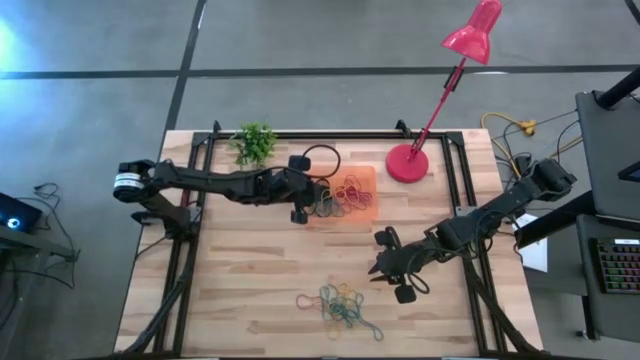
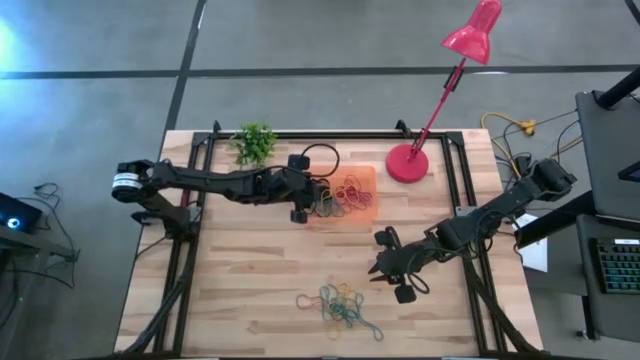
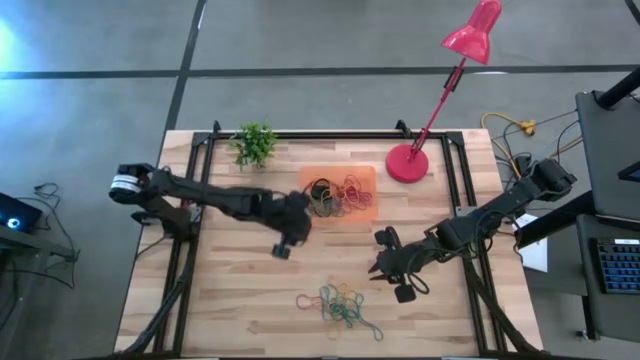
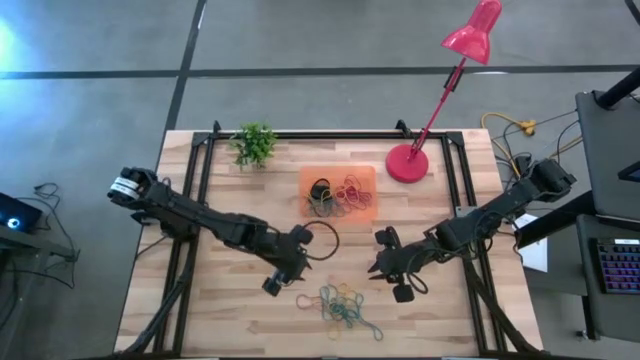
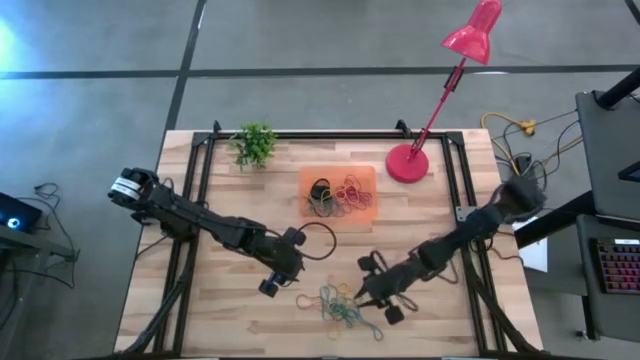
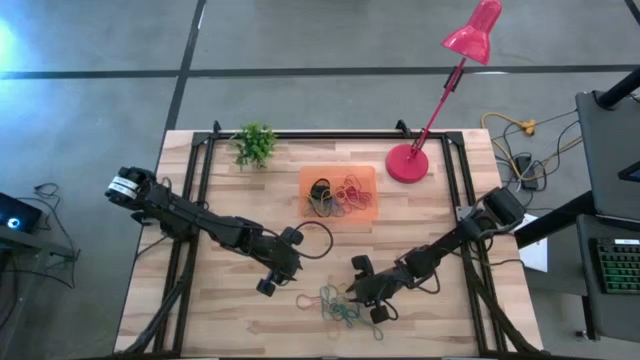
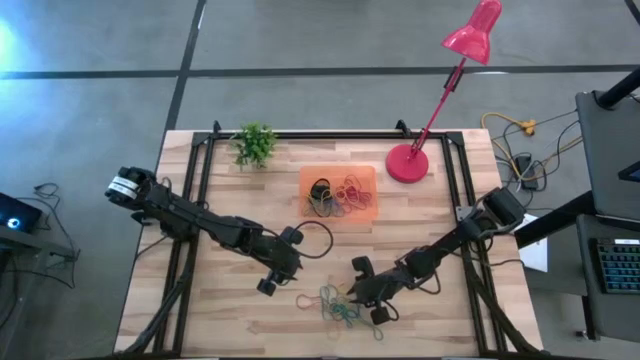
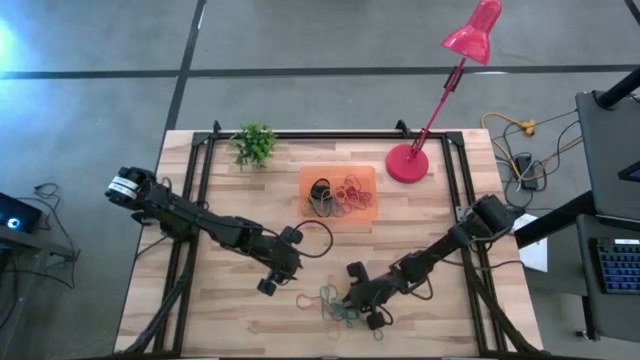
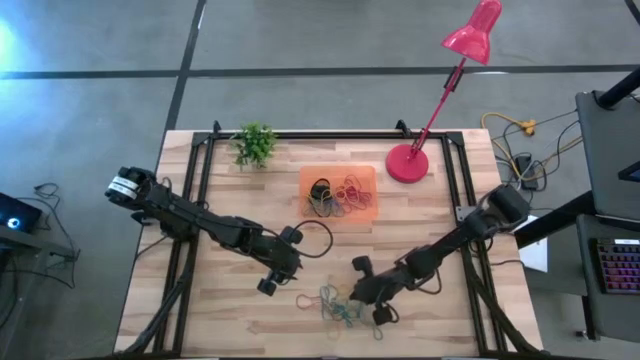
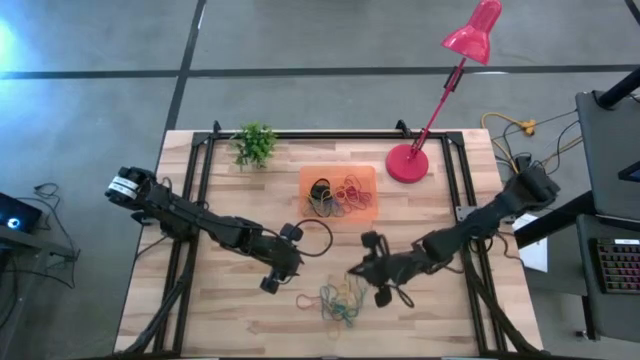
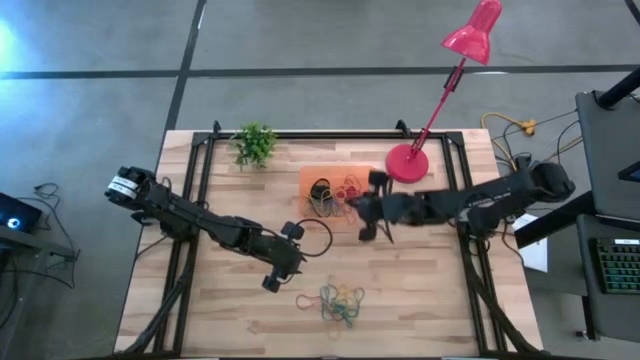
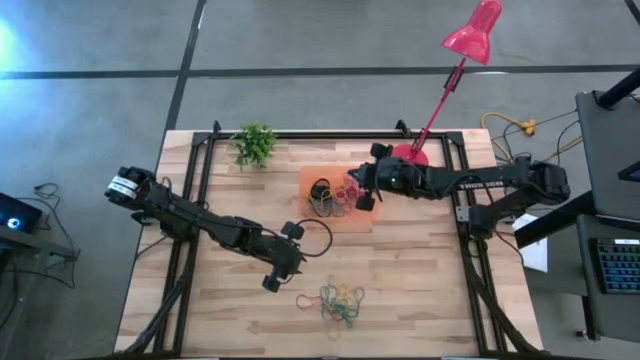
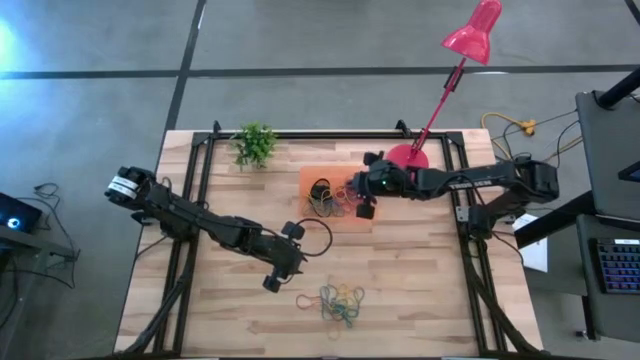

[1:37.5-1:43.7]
Task: Pick and place rubber bands into bin
Put the blue rubber band into the bin

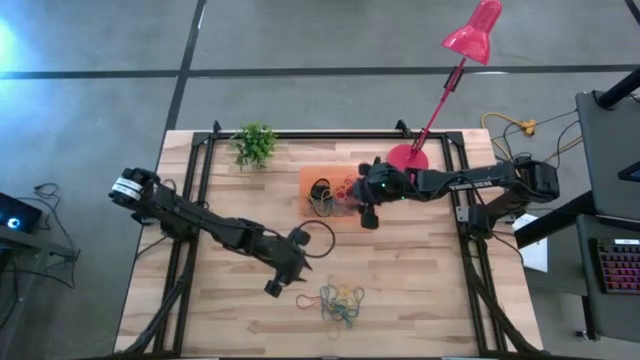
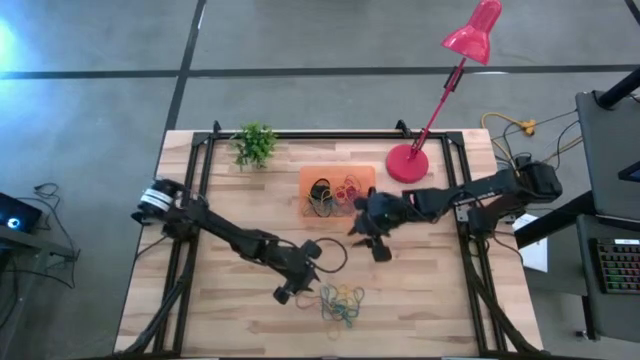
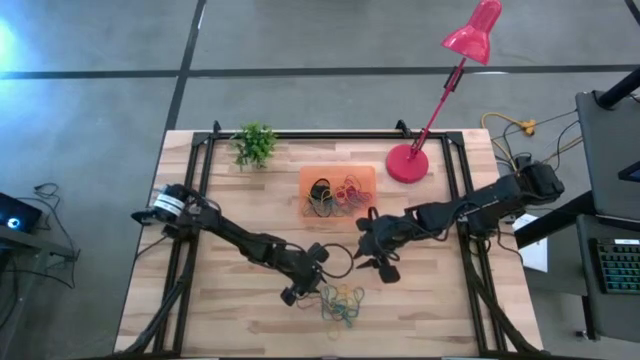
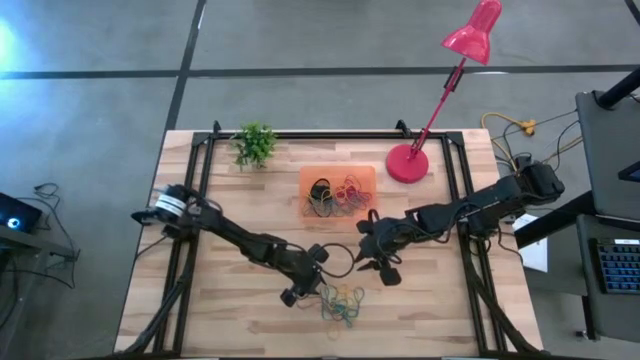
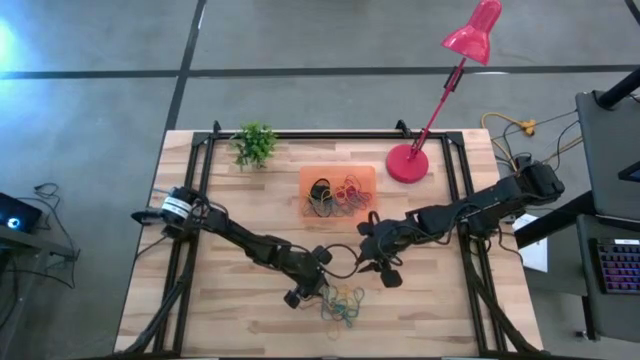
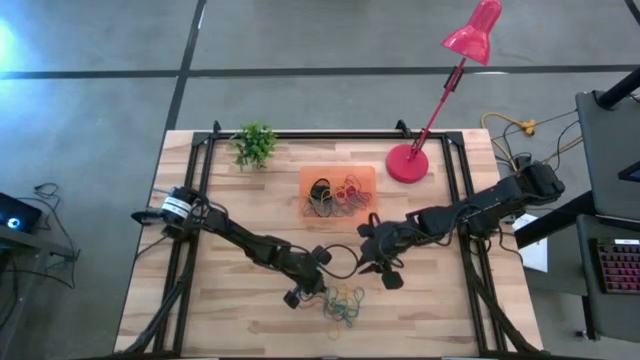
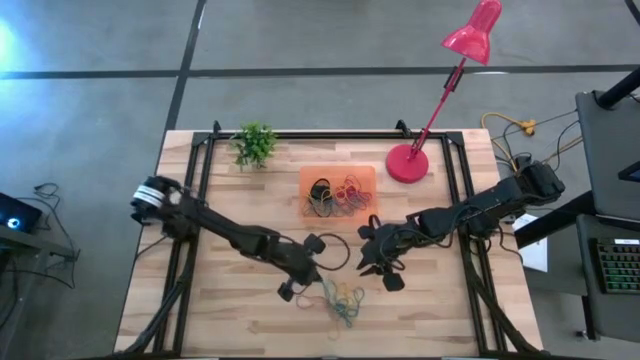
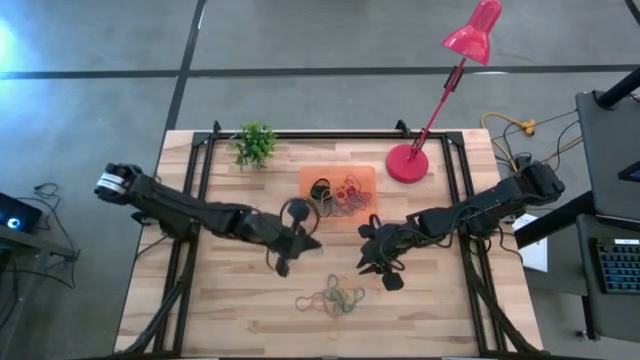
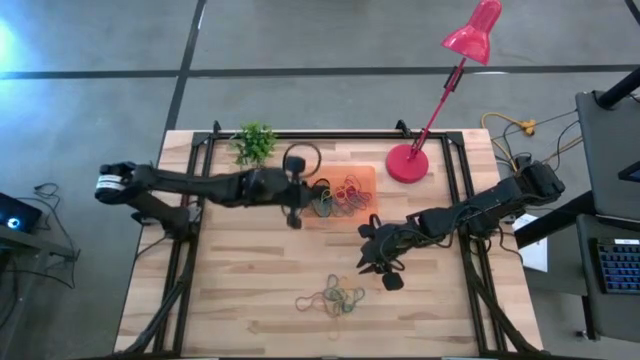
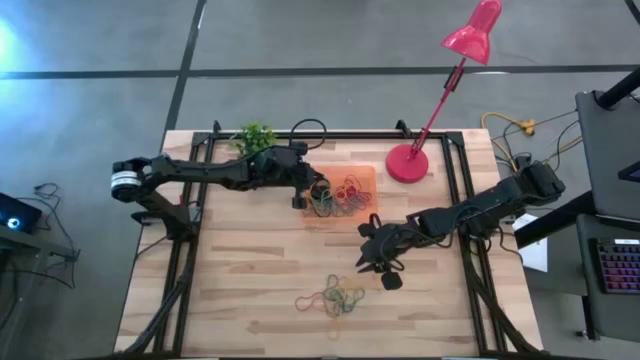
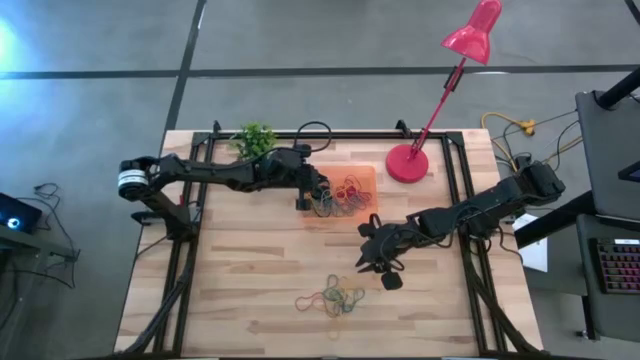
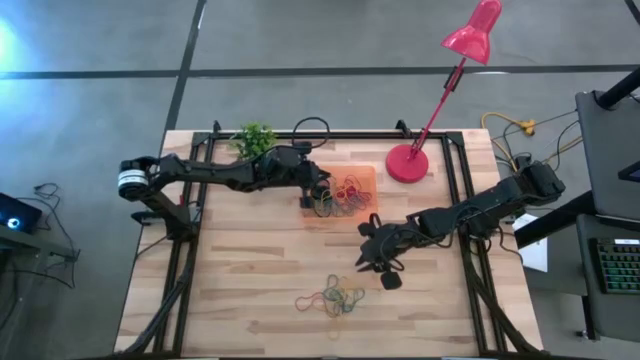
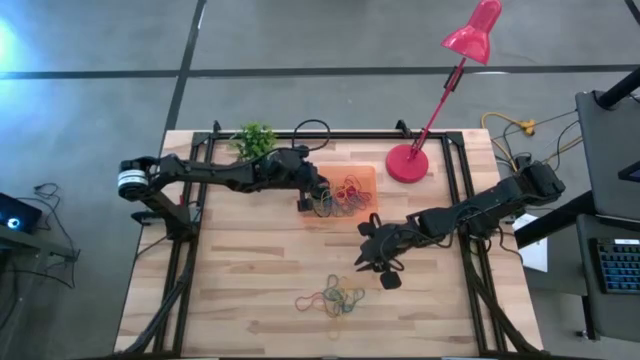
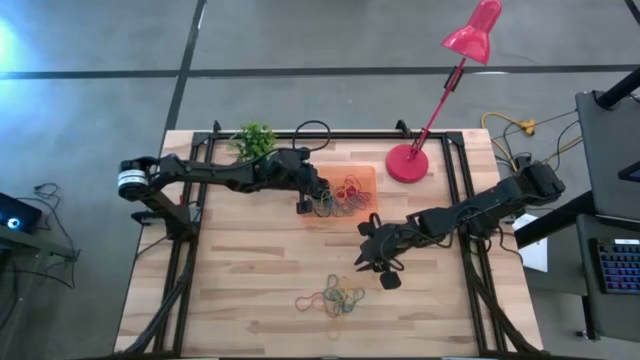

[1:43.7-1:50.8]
Put the blue rubber band into the bin

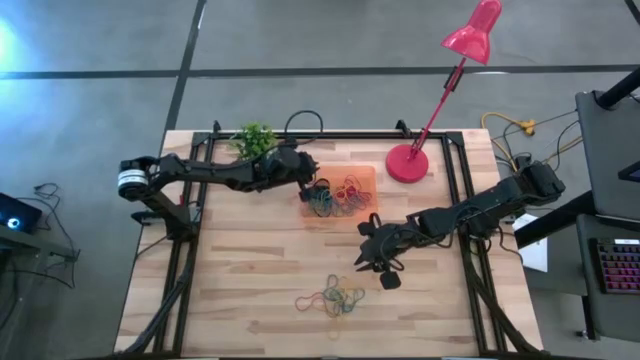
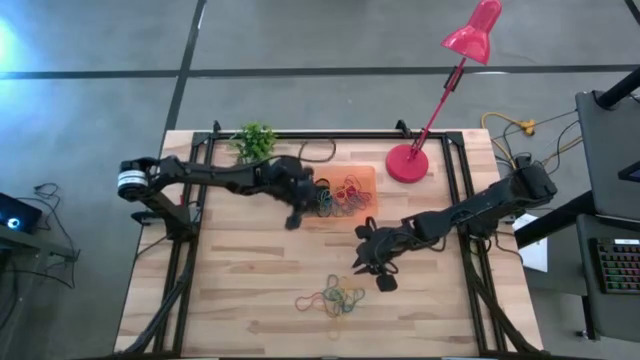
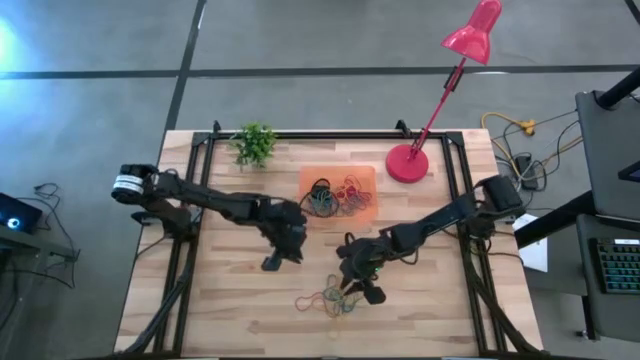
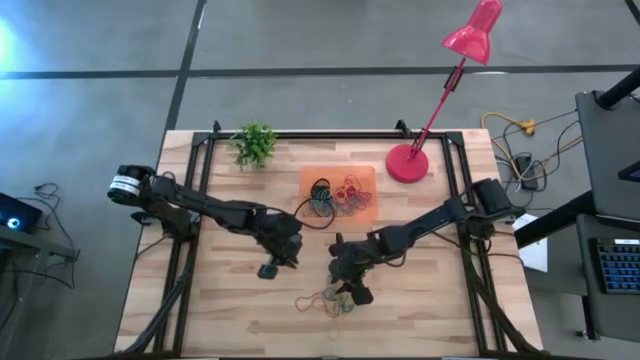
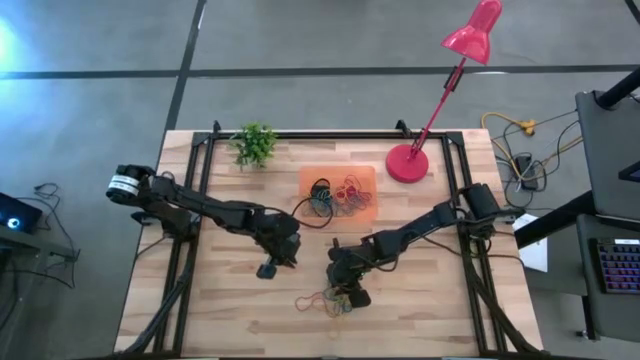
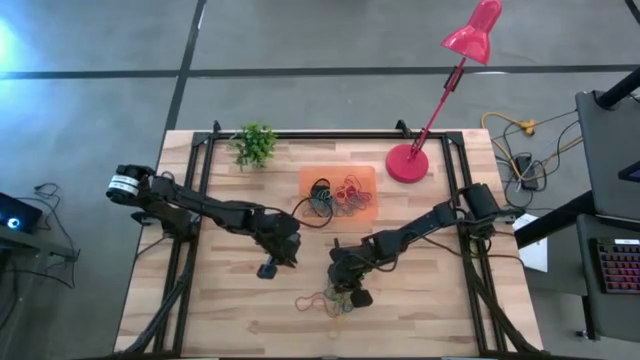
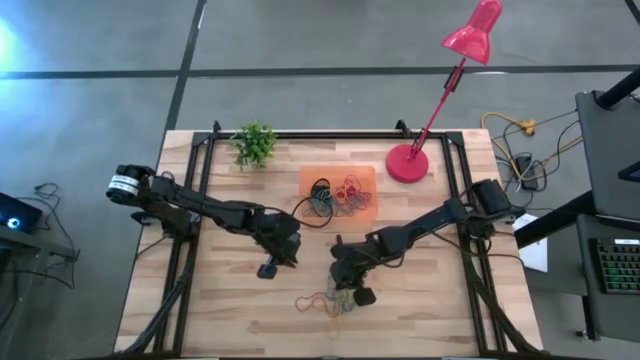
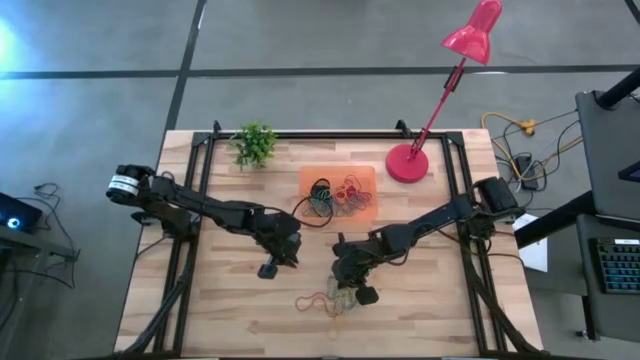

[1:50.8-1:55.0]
Put the middle blue rubber band into the bin

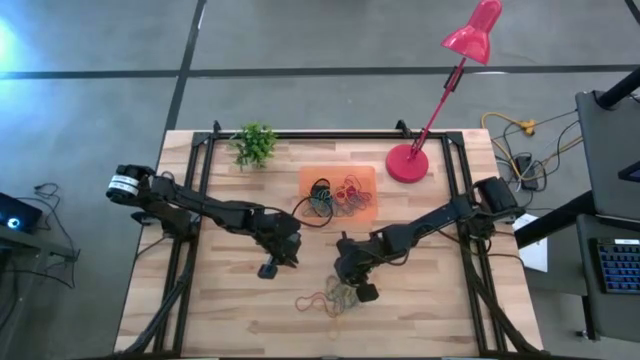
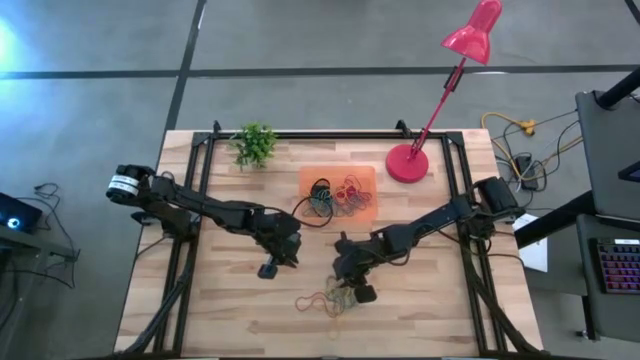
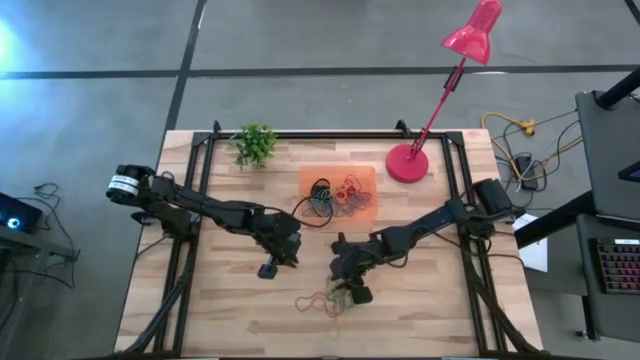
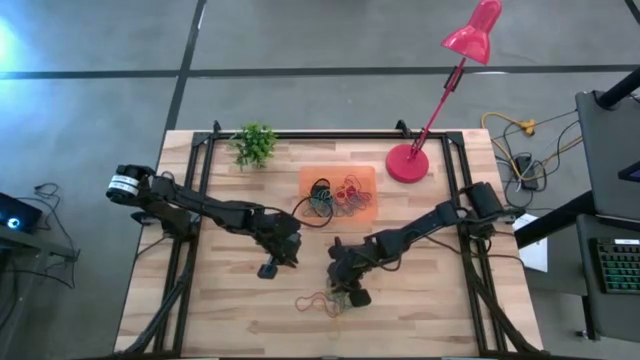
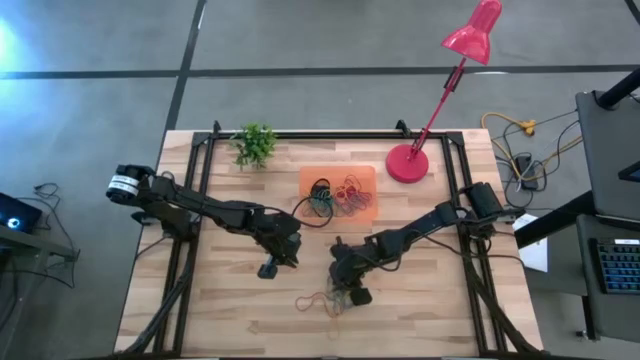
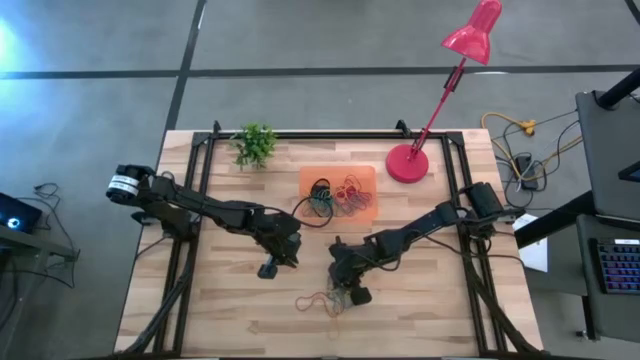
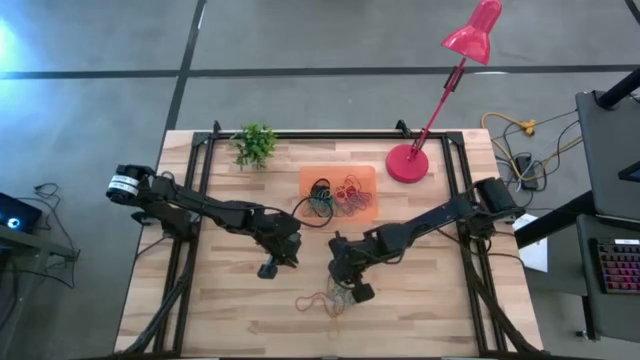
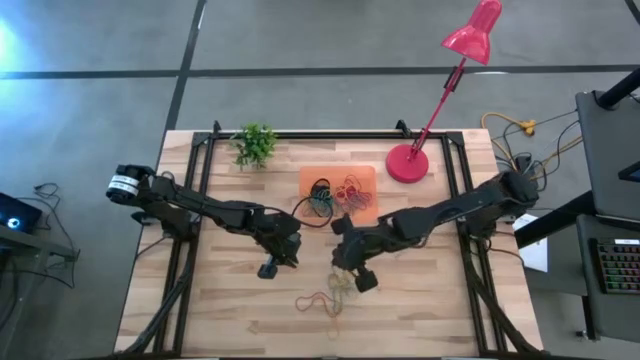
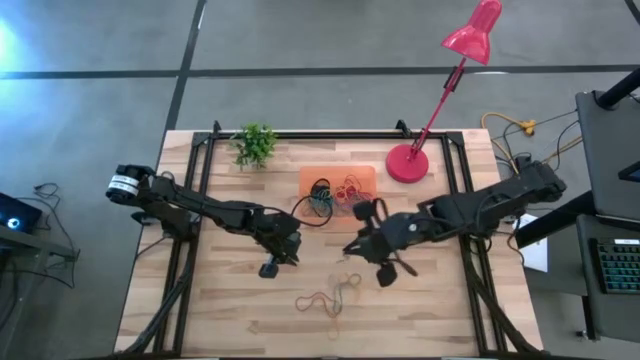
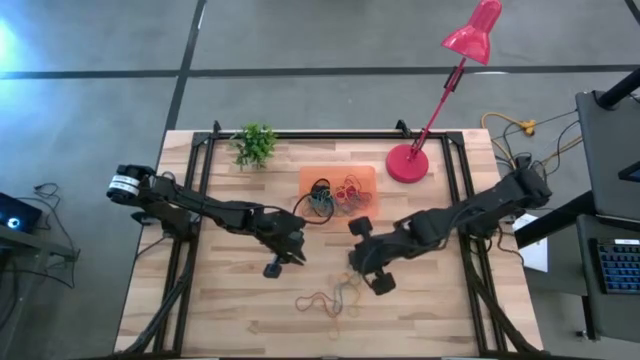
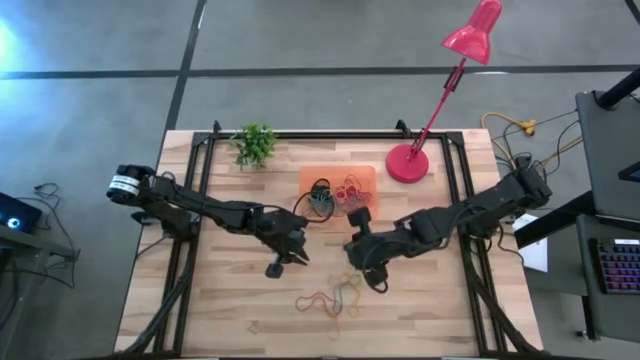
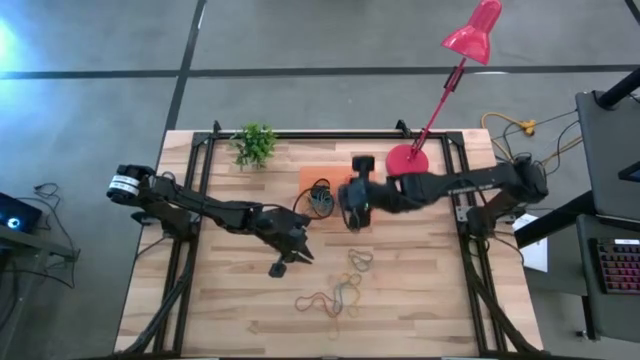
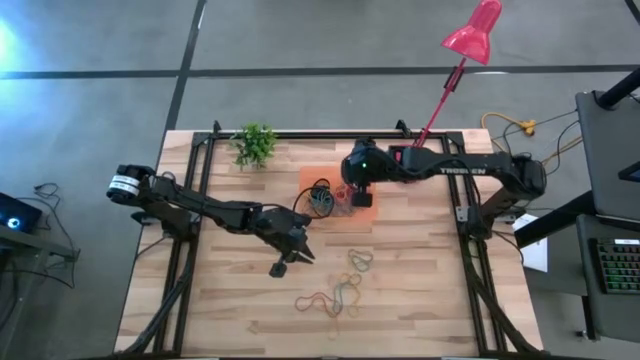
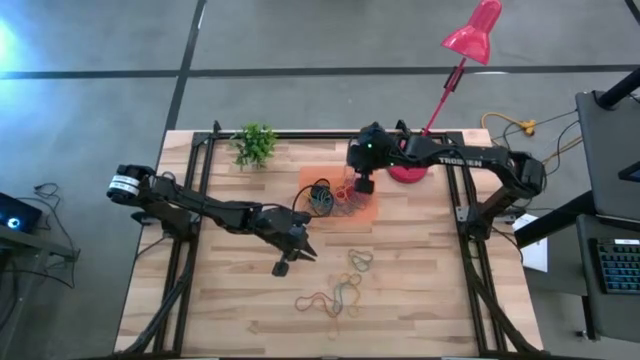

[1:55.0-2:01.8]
Put the middle blue rubber band into the bin
